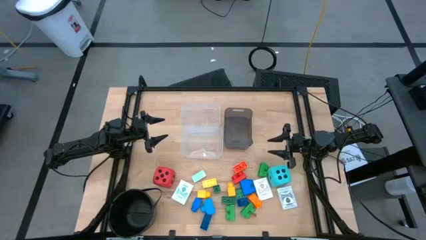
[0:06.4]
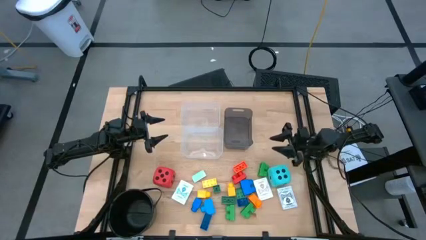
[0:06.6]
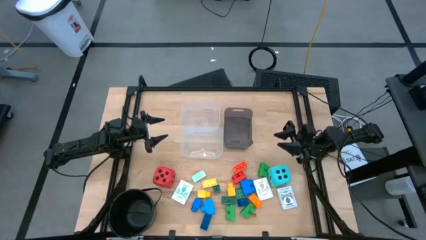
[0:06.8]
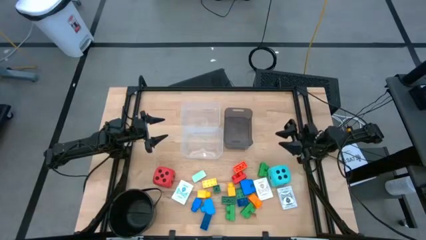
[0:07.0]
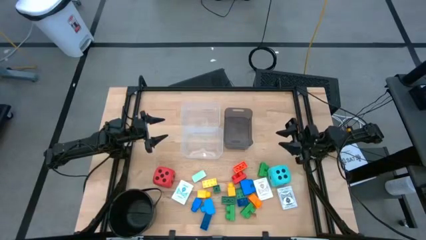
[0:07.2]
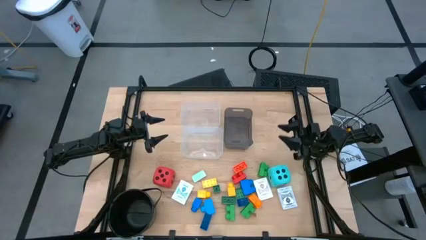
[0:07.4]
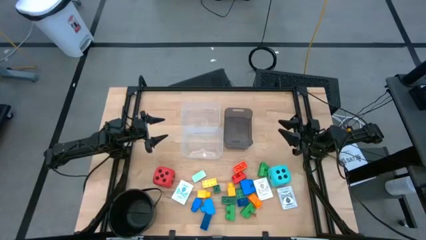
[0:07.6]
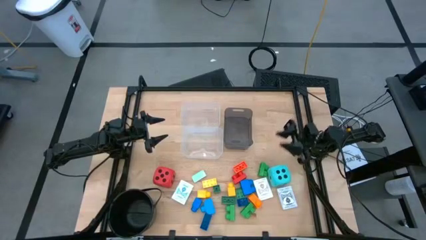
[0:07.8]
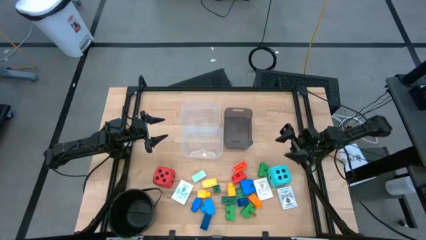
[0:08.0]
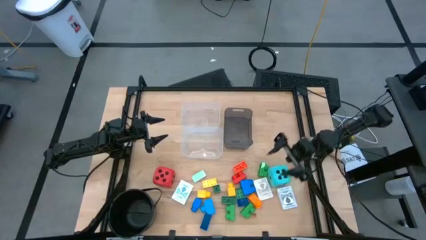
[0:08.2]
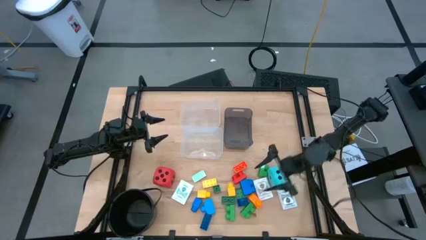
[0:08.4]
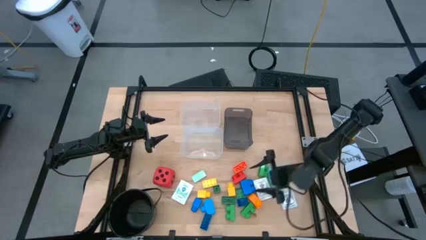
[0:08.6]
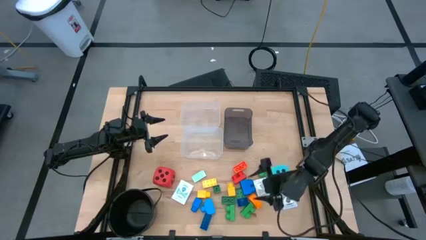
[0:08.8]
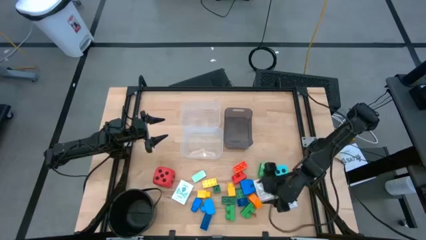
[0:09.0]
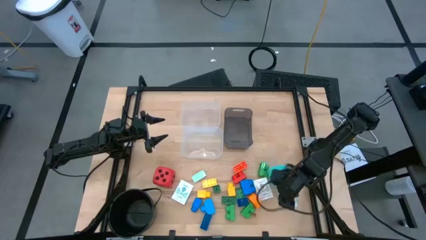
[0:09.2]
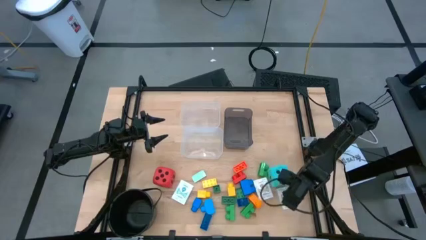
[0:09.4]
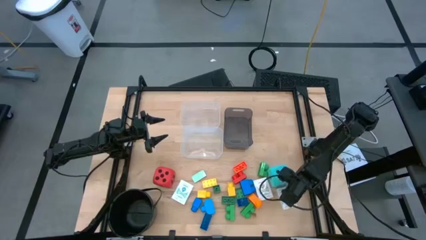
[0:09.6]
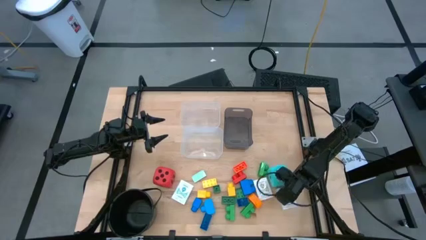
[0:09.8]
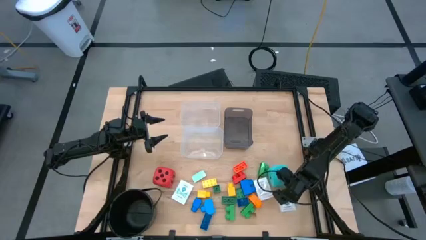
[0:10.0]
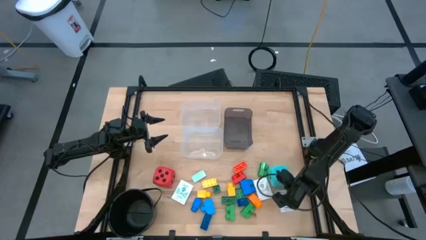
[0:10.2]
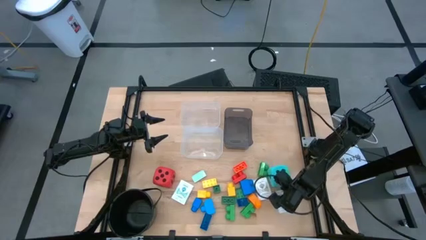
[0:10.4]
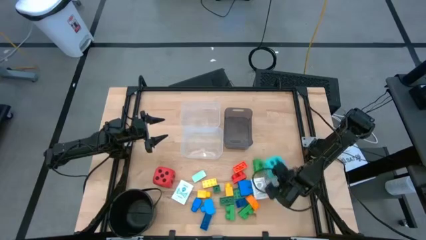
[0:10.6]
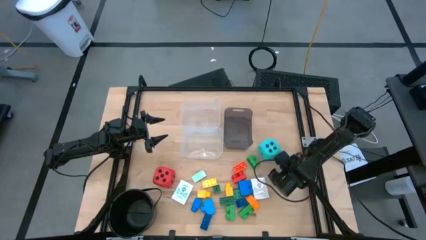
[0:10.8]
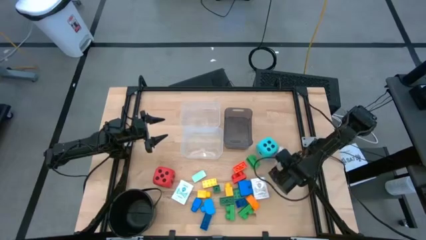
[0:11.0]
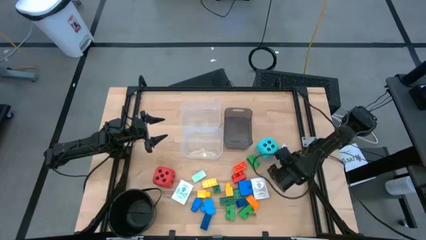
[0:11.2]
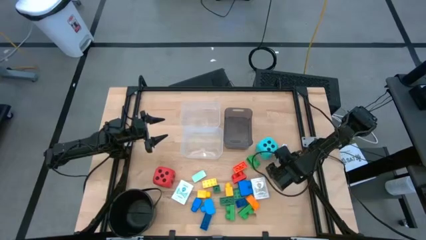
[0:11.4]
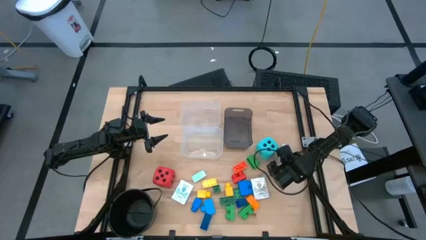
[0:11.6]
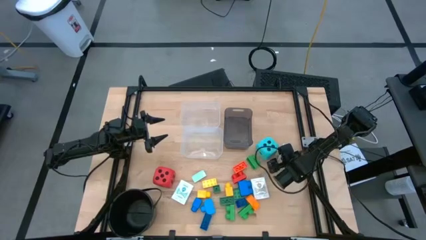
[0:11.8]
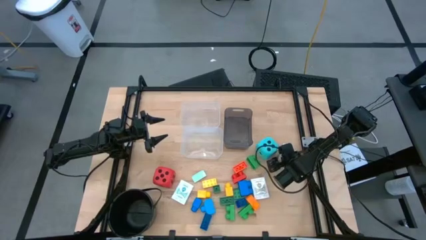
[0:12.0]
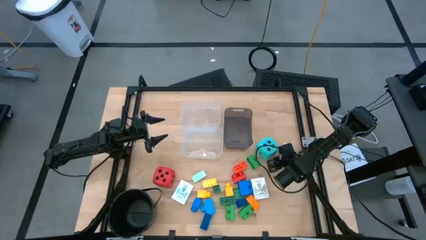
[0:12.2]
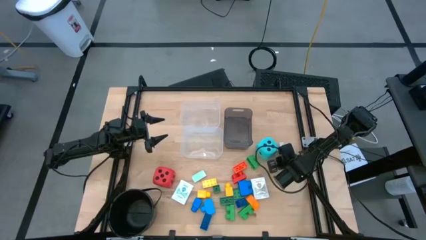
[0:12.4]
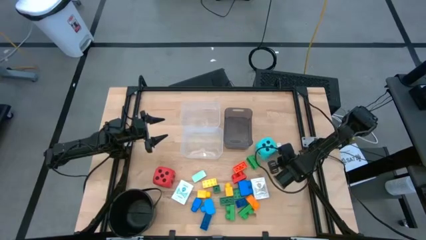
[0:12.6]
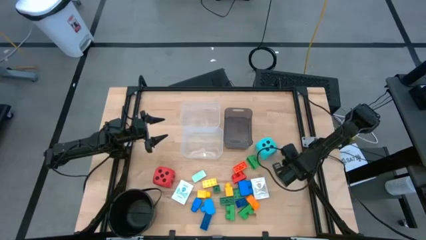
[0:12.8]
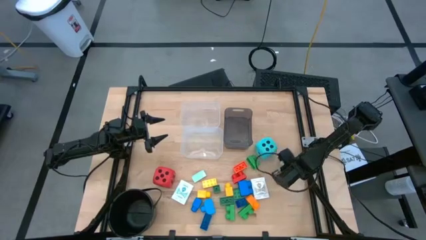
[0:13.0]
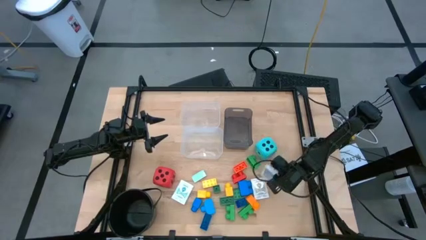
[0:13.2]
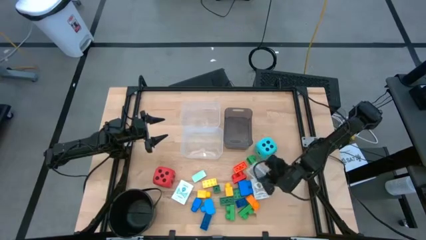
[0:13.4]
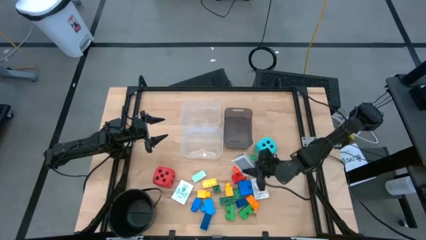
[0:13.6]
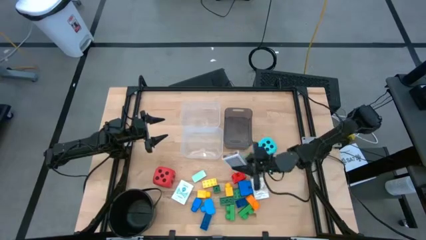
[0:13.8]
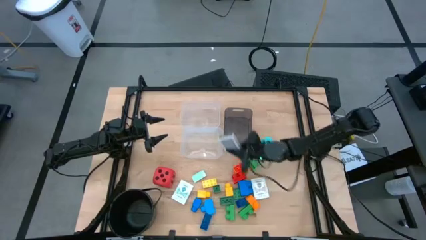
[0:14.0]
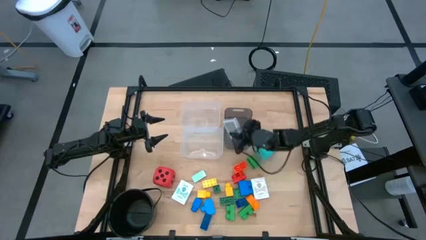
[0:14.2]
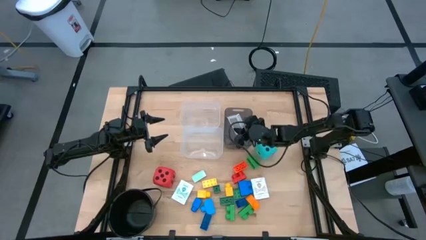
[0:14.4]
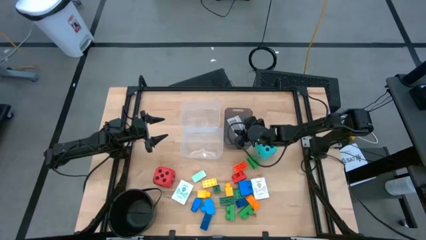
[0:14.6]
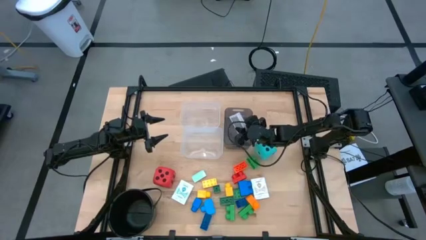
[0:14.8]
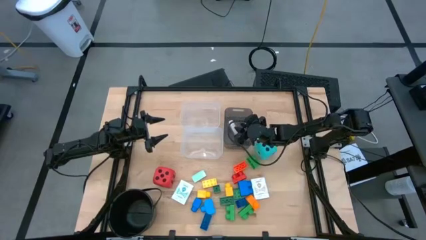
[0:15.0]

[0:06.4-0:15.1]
Task: Pick & Place Toys
Put the black deck of cards into the black bin

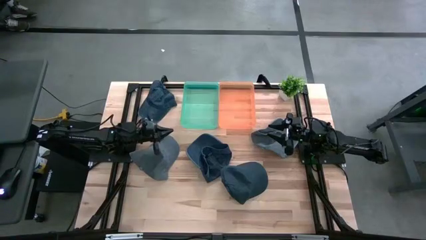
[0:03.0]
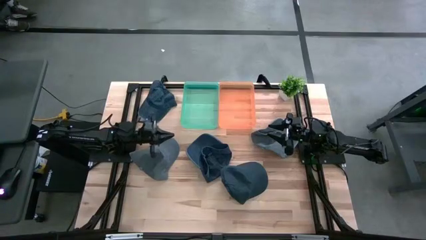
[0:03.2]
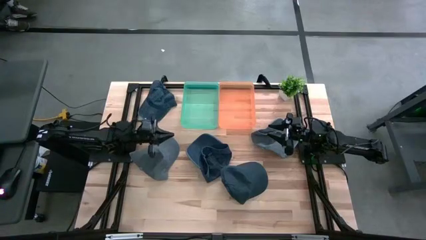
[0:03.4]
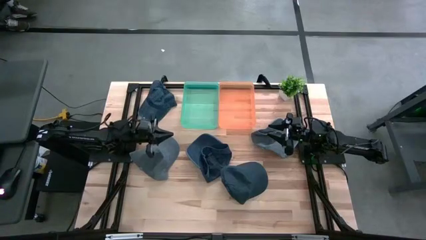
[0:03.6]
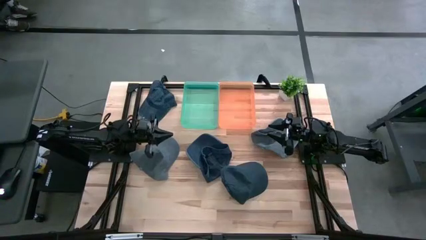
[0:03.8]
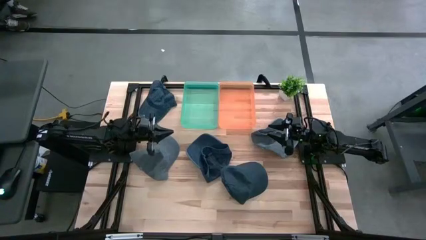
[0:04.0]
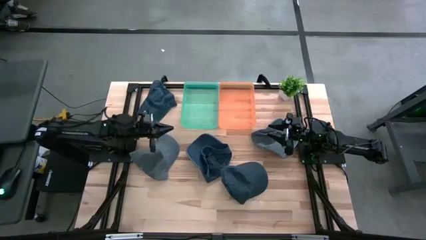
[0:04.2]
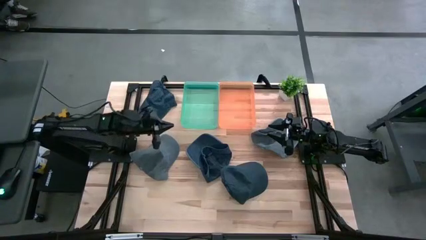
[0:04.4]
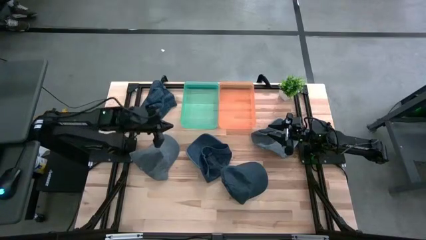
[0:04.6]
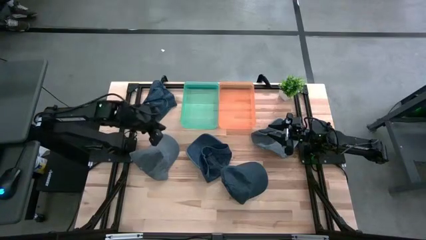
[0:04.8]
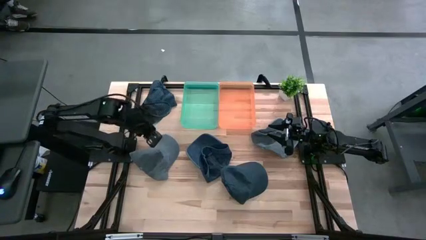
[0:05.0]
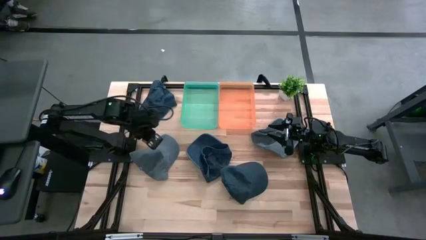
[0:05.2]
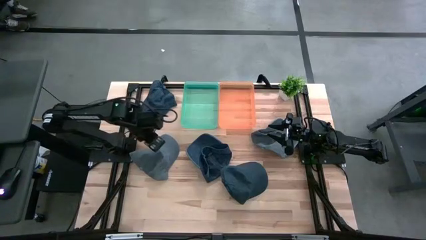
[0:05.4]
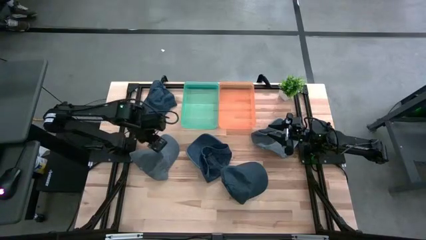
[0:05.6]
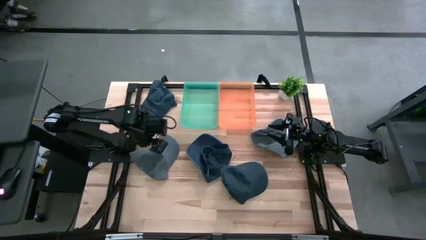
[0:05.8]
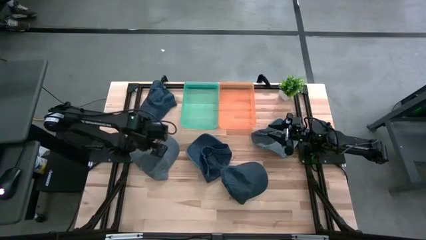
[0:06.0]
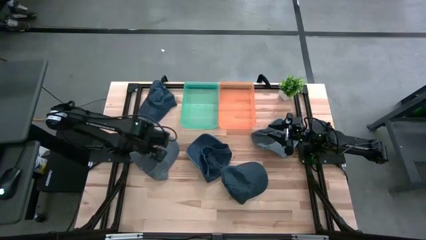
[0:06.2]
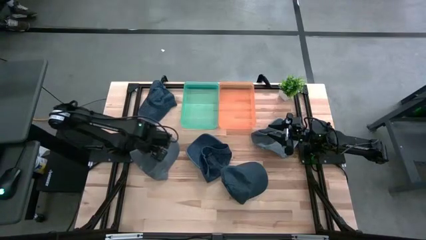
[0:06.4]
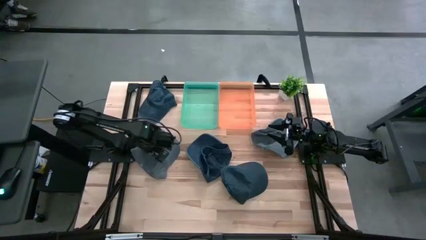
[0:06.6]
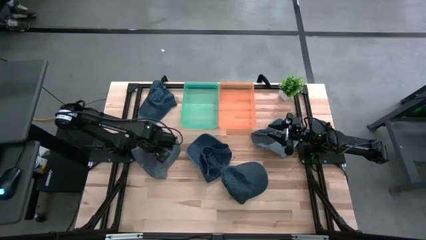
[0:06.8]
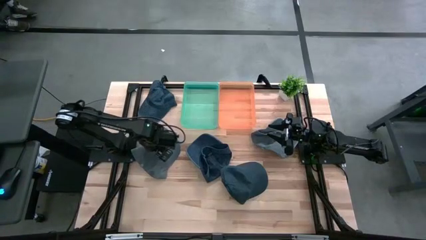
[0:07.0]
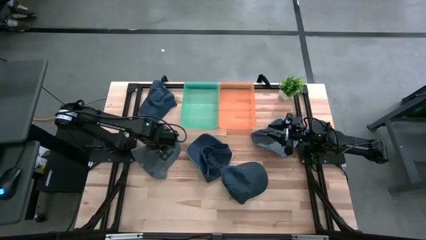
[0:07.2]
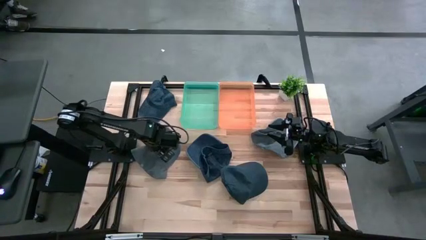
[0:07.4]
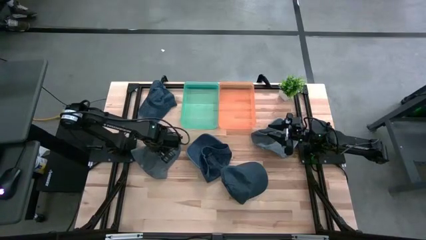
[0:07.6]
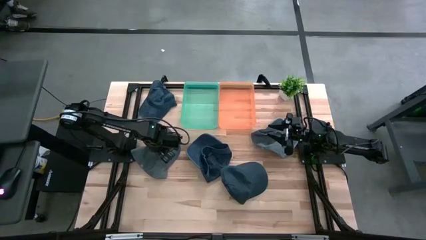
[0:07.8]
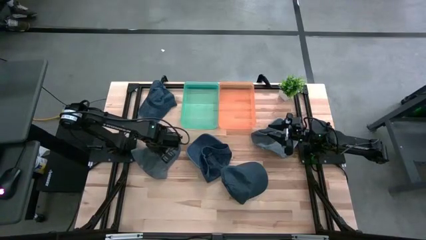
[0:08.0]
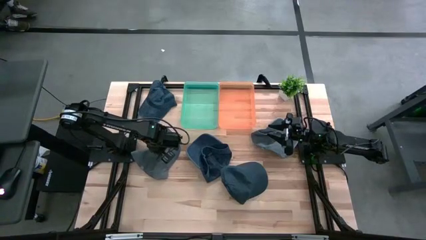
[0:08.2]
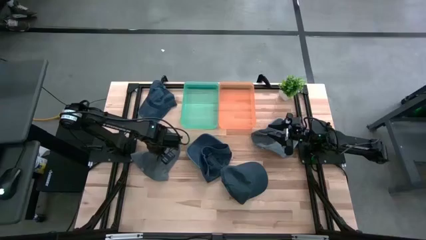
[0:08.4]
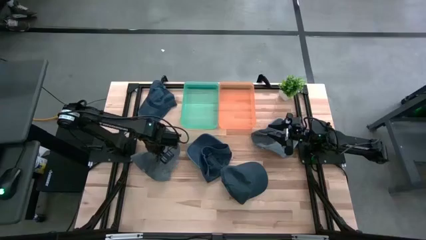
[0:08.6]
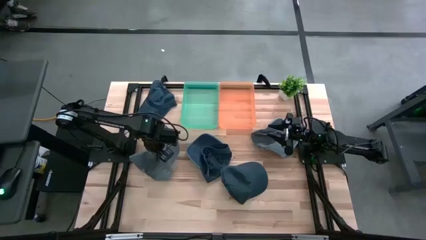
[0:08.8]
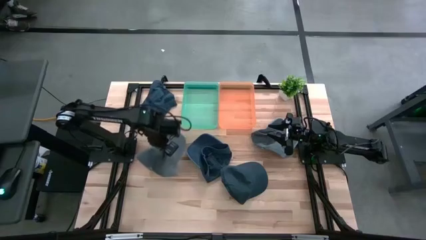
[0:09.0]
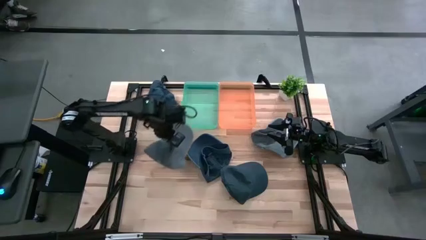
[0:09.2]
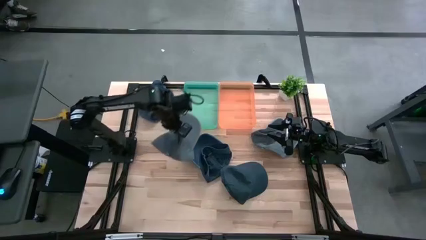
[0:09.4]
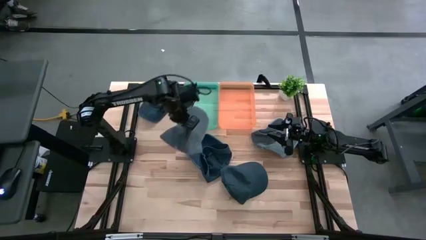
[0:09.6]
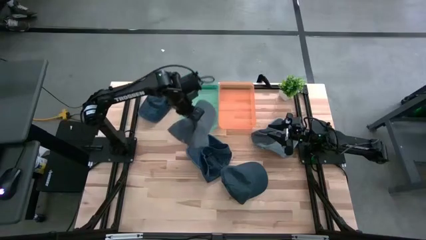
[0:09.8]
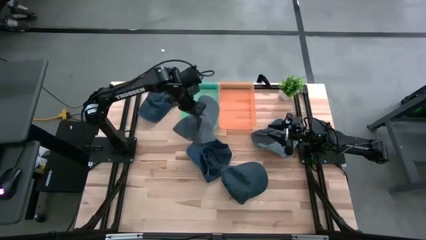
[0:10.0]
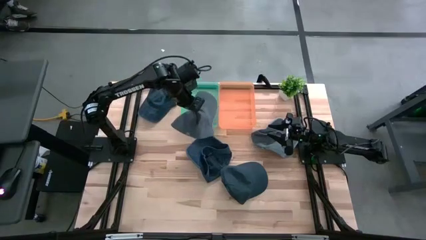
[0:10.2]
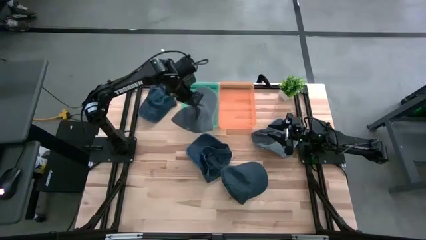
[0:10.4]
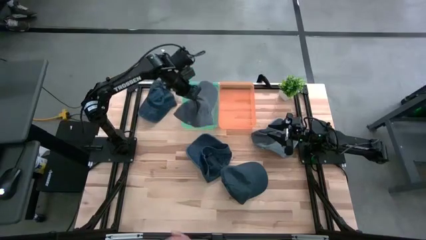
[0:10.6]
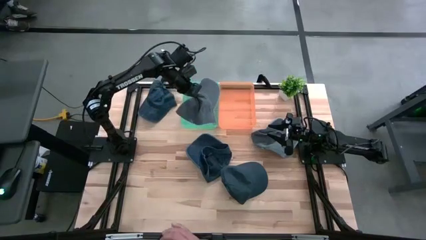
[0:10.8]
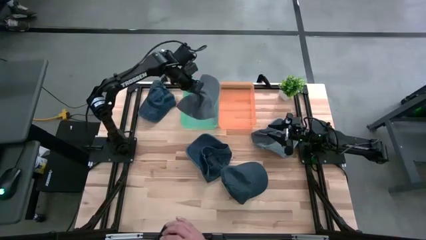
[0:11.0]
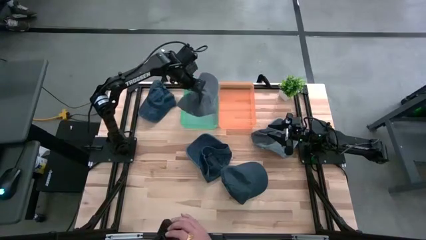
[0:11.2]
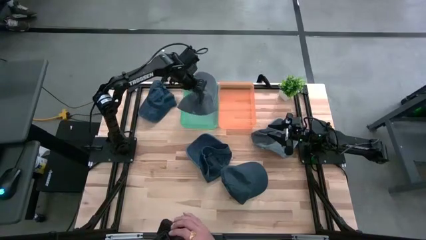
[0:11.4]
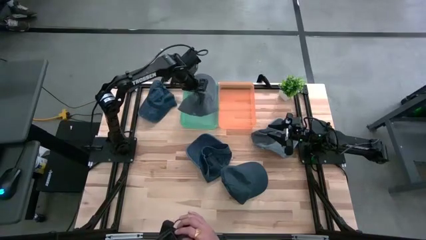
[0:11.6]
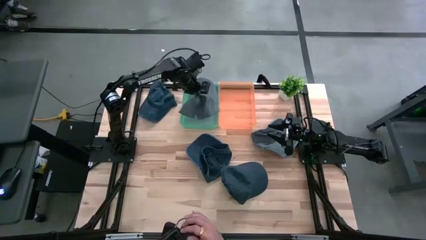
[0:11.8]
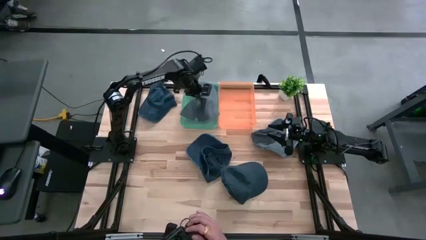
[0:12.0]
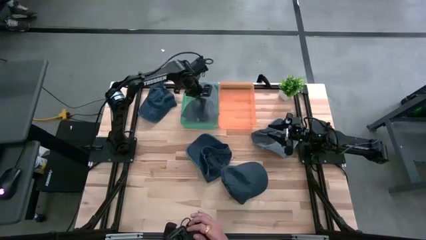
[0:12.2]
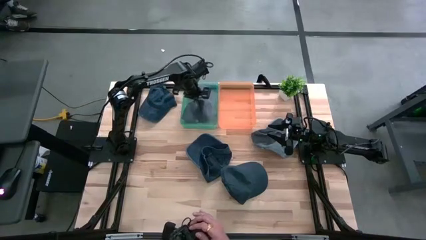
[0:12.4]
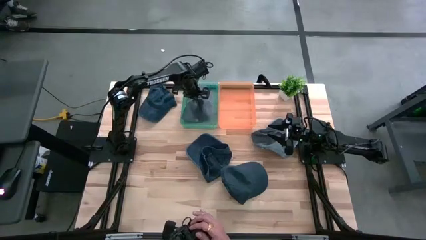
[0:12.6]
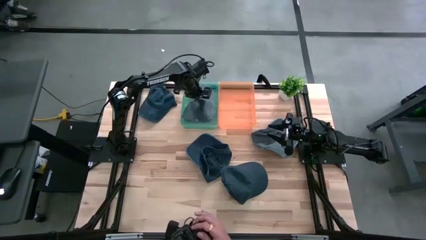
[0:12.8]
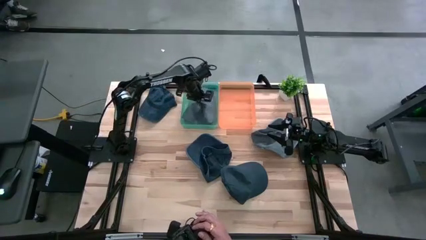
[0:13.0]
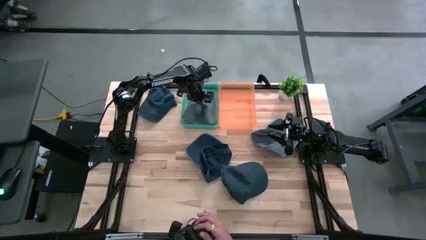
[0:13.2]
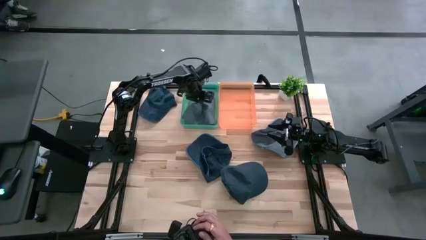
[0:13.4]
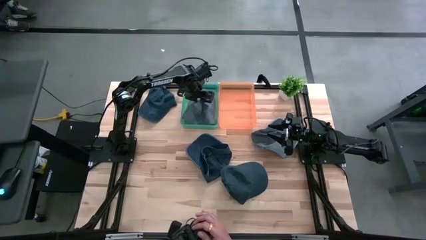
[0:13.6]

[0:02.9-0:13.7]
Task: Pick & Place hat
Put the left gray cap into the blue bin
